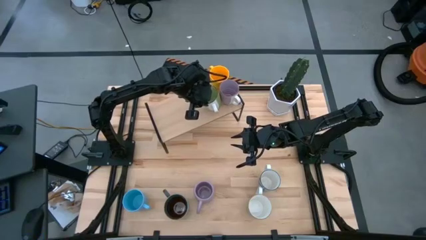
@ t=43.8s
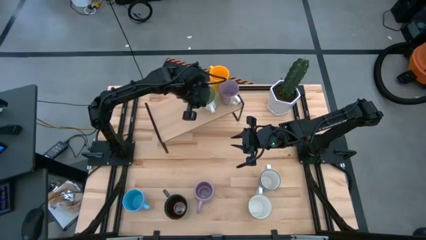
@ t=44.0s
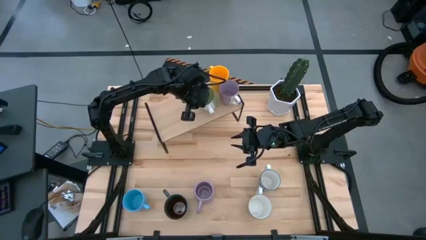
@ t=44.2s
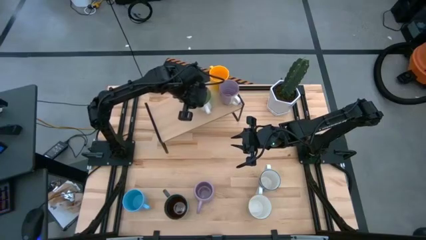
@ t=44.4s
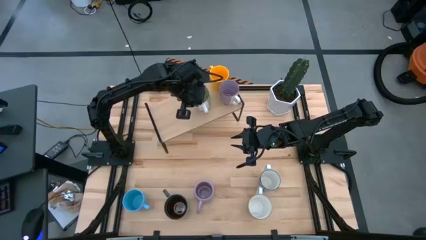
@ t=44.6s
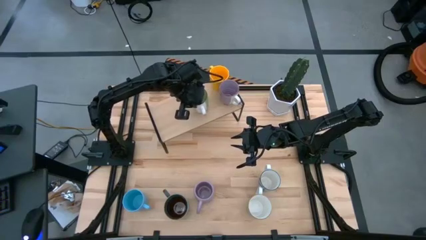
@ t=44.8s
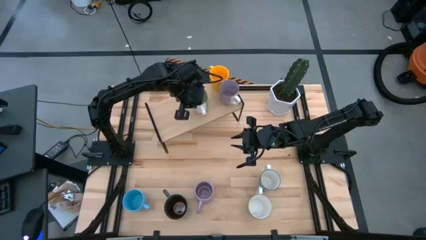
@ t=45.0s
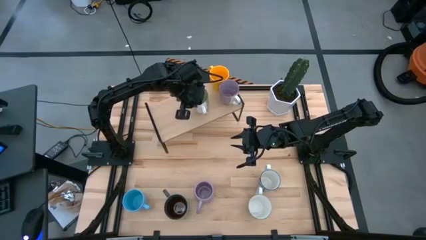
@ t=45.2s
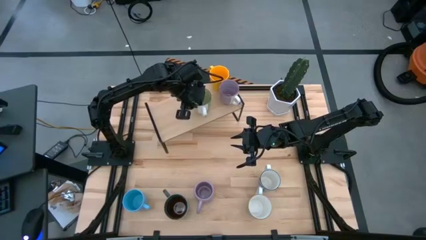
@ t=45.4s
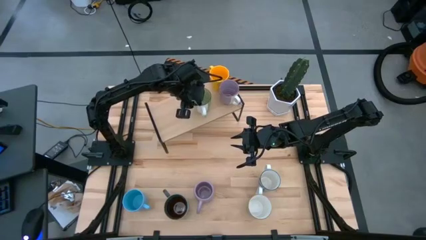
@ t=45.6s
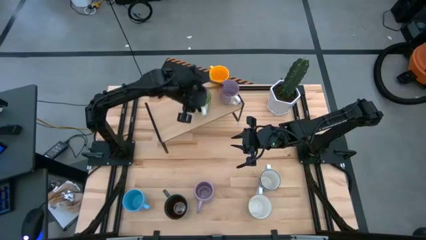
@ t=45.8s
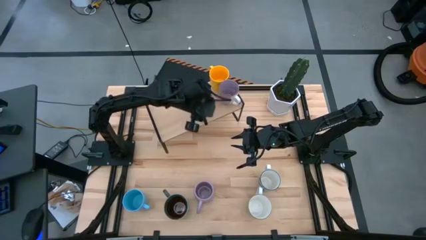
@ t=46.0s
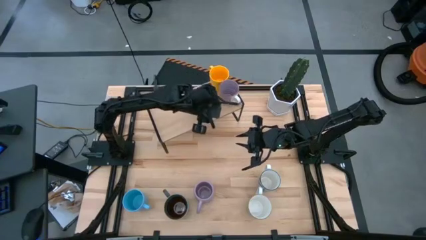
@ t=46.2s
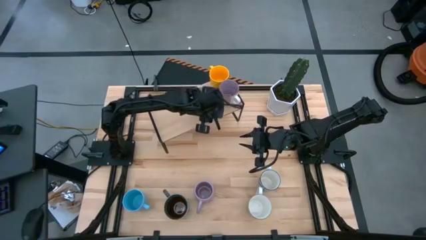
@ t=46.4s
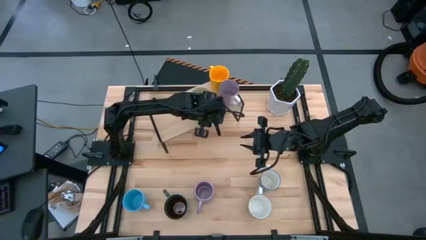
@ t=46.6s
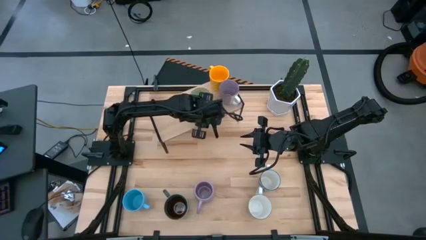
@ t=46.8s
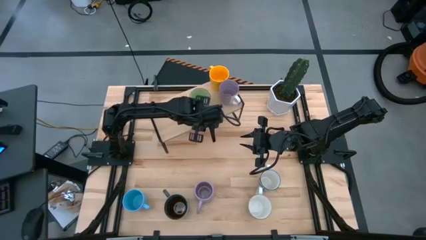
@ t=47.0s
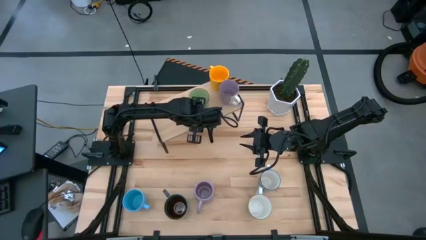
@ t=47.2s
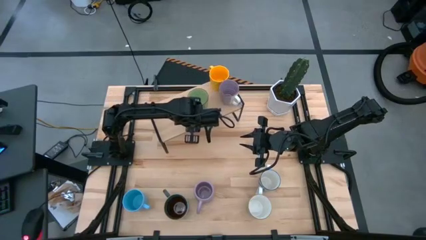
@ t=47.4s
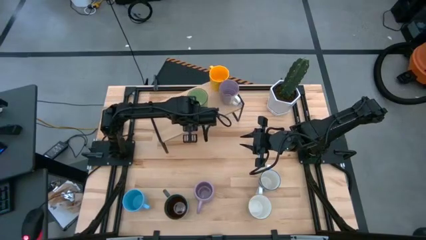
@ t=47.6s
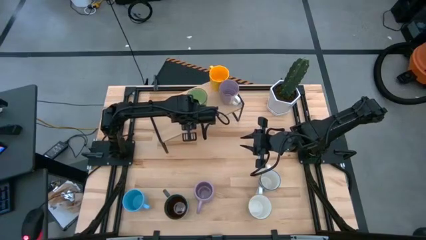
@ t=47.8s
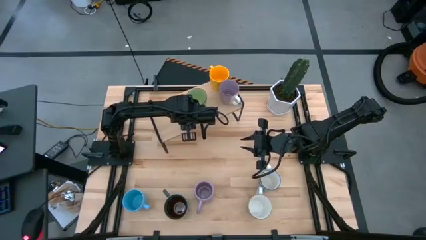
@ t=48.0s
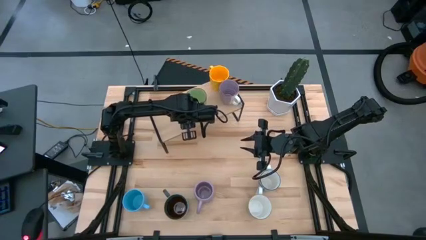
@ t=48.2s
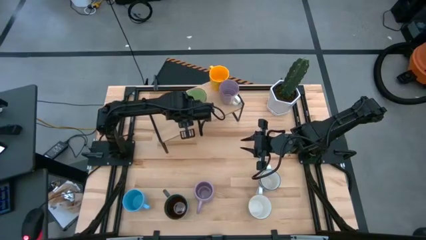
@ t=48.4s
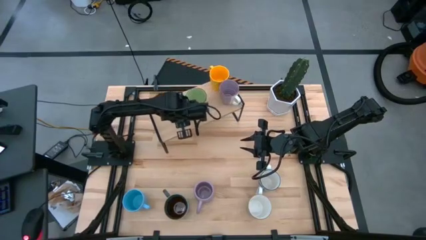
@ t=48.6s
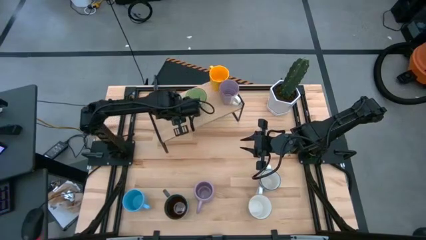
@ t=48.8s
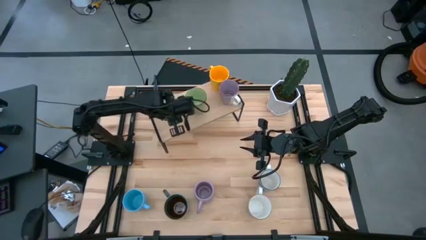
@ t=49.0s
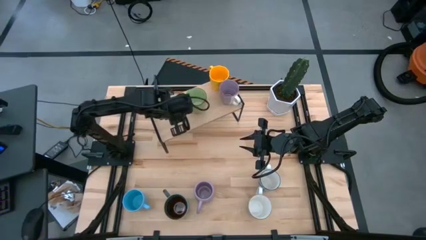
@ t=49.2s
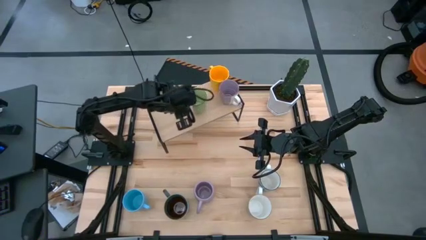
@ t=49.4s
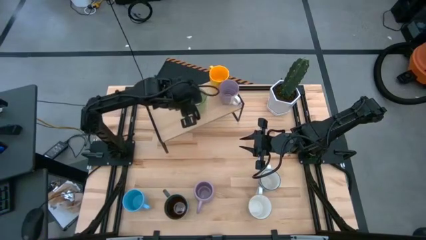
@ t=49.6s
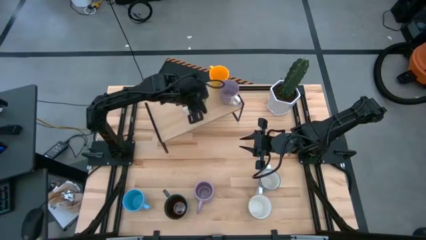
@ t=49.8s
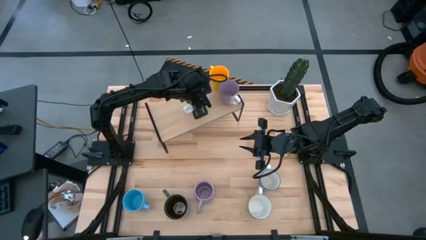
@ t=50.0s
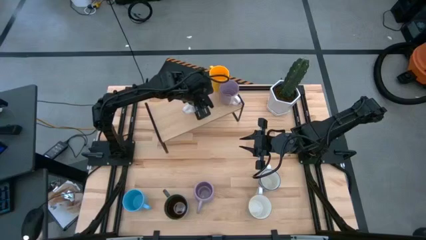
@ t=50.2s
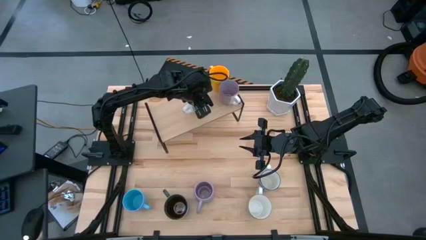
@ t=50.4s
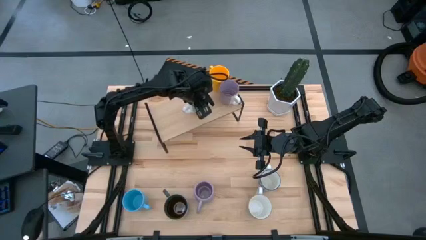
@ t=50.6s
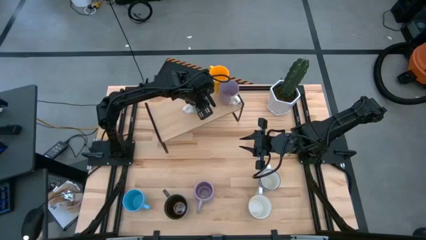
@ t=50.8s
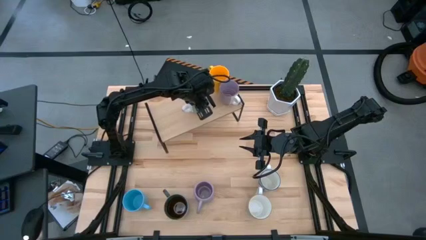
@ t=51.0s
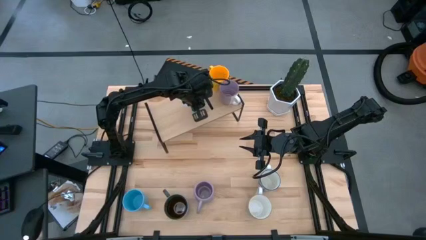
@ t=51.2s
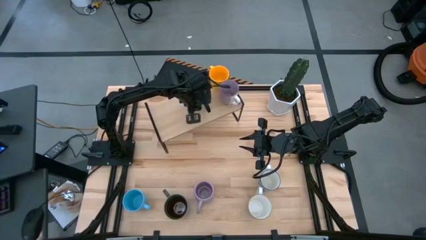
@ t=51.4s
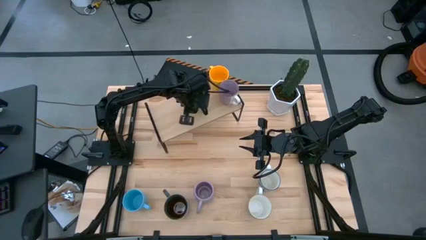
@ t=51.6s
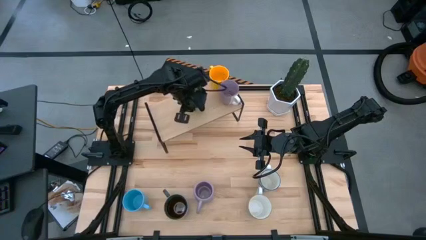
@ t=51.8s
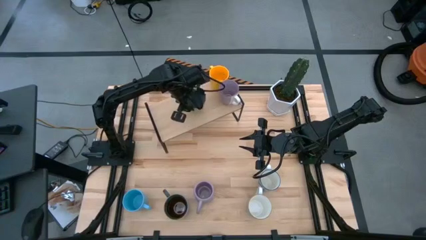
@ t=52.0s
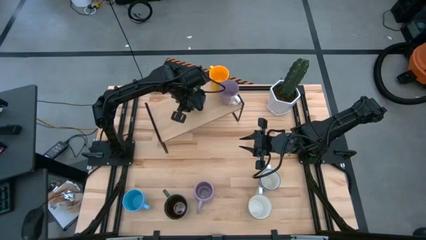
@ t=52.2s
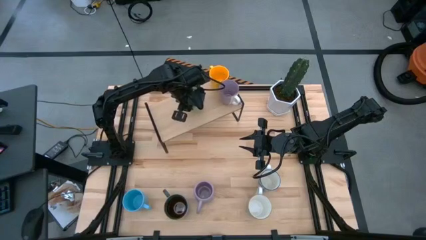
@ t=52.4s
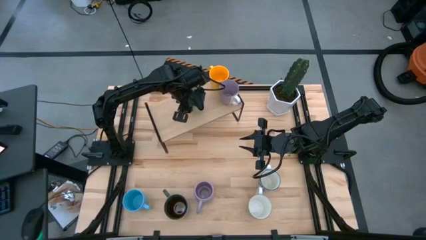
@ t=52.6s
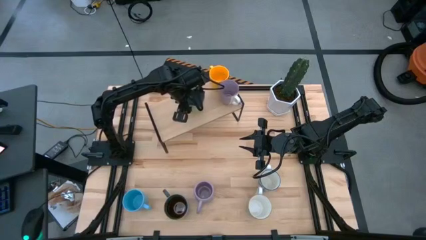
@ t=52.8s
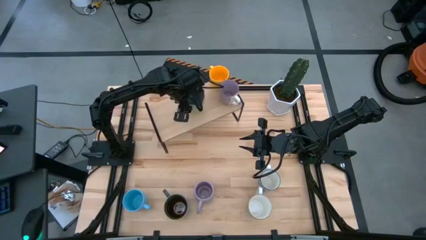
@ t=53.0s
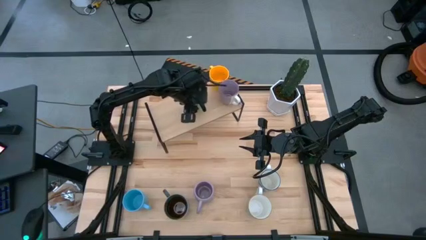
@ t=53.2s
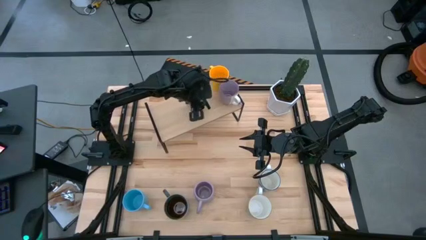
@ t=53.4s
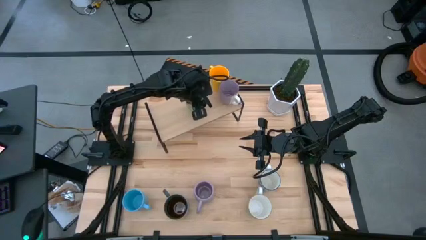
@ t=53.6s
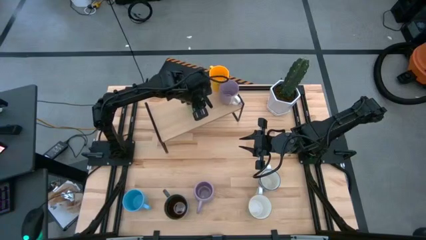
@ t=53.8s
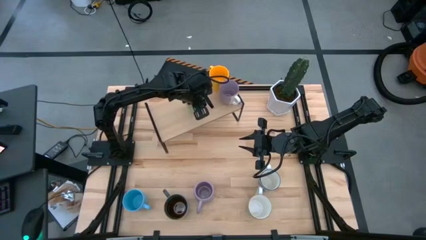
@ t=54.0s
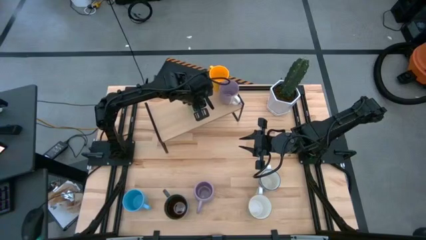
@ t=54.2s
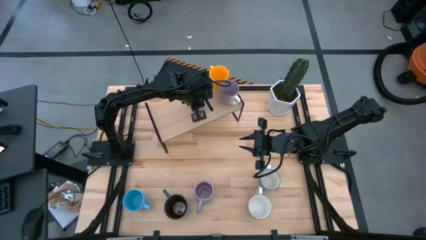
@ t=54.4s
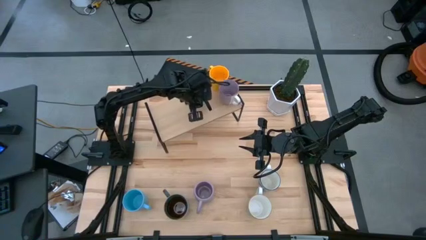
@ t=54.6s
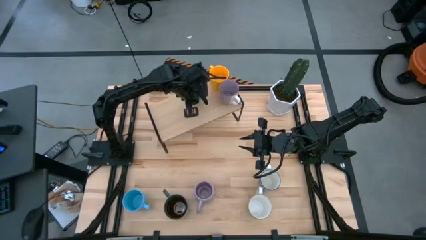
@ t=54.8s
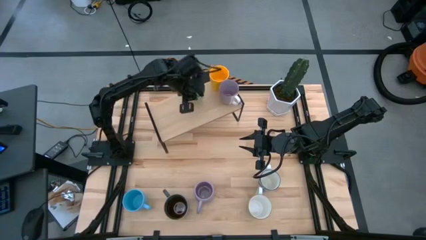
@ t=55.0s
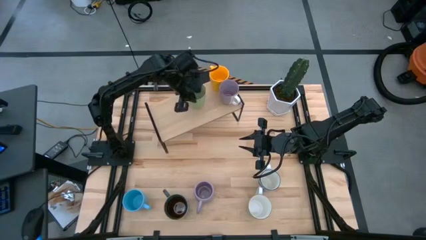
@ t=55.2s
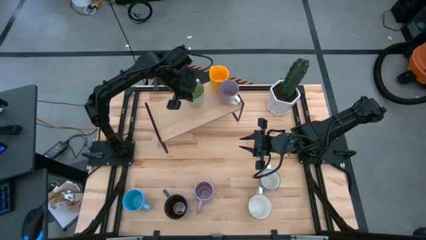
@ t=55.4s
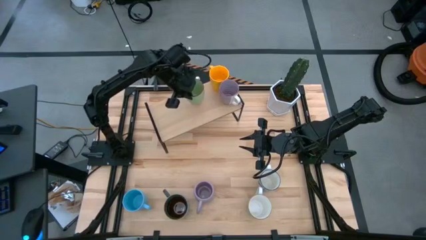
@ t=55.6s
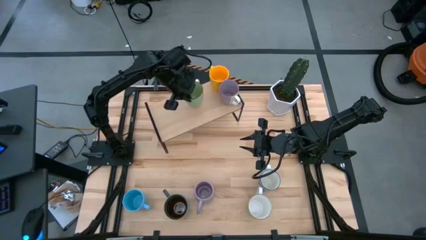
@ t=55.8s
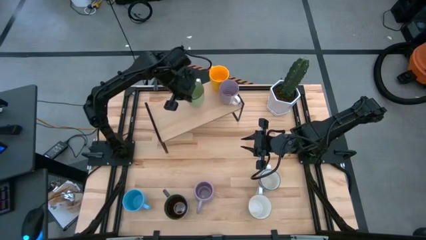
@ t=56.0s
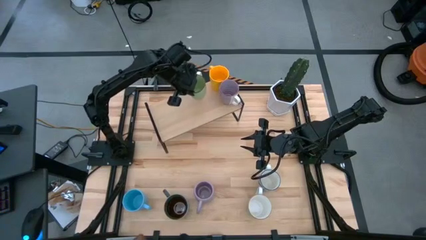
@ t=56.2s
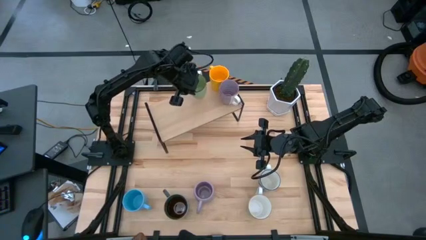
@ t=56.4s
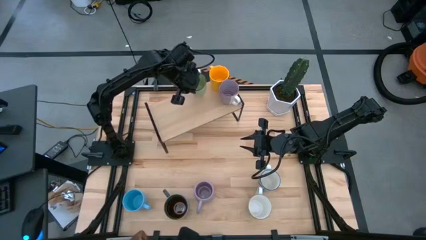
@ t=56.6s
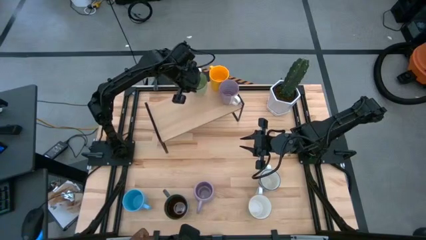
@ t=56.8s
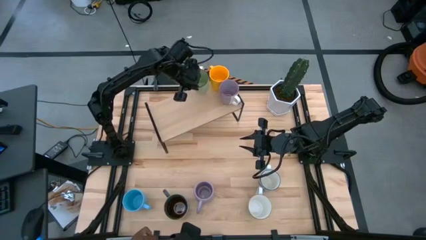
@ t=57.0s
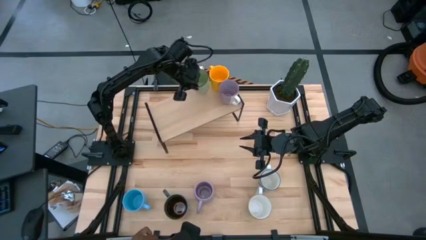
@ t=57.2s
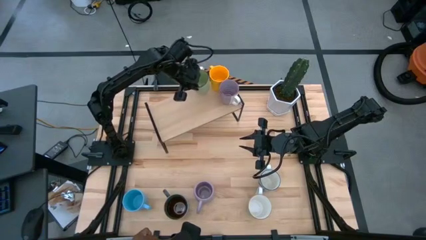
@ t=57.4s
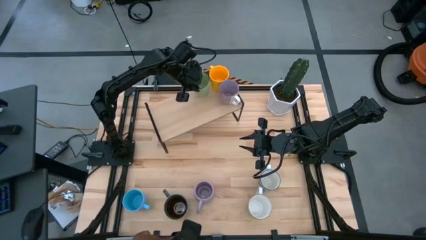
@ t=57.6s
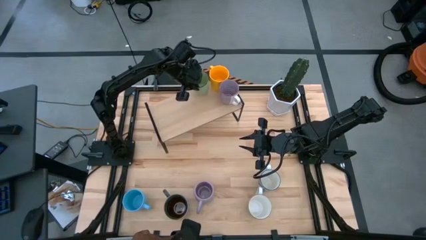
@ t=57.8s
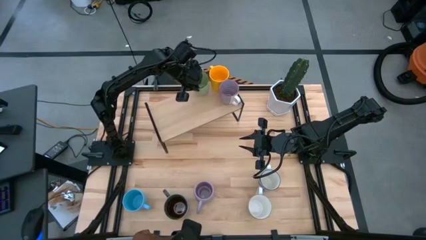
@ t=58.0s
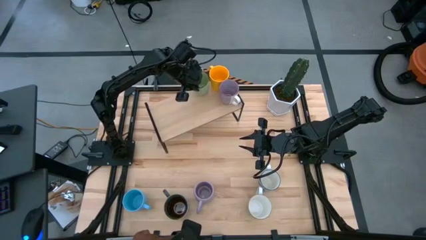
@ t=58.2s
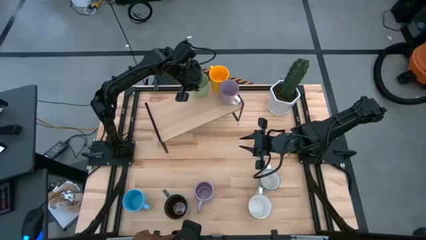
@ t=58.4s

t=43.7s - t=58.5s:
Task: Place coffee mugs
Put the green mug on the shelf
